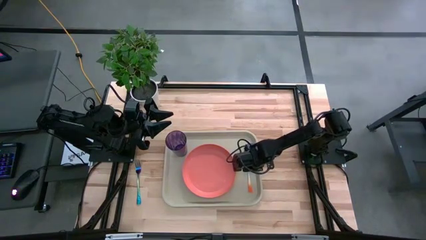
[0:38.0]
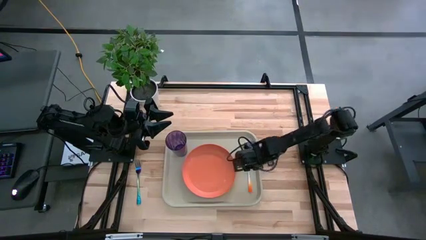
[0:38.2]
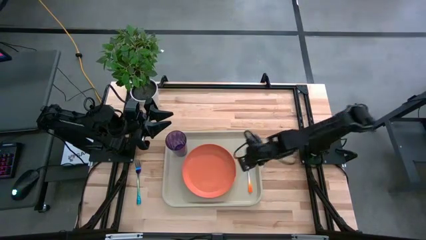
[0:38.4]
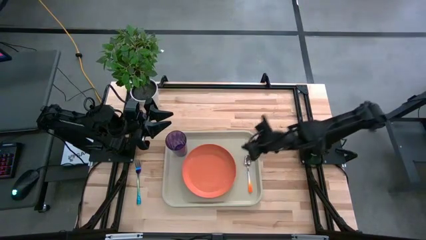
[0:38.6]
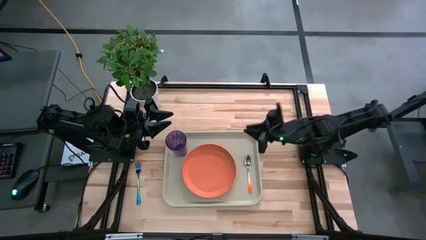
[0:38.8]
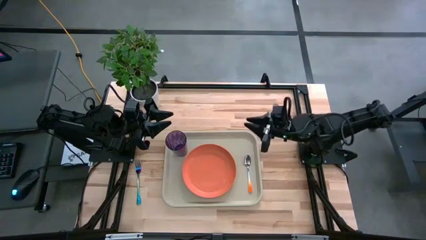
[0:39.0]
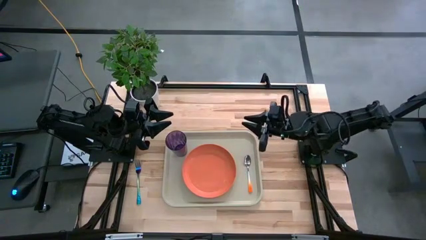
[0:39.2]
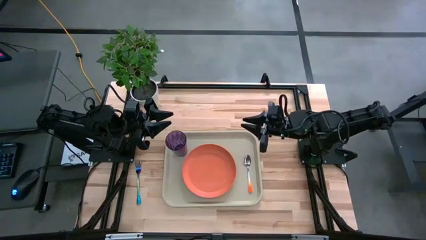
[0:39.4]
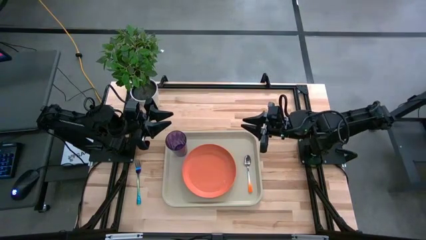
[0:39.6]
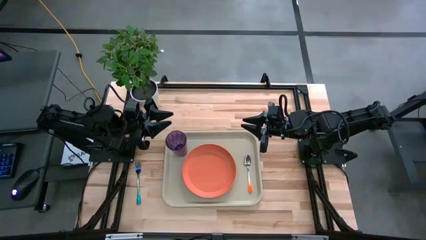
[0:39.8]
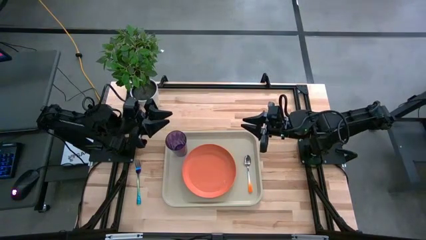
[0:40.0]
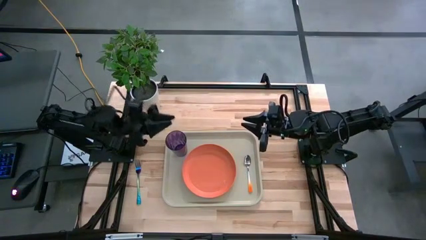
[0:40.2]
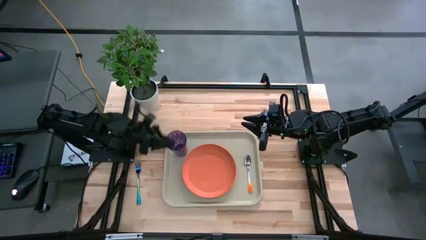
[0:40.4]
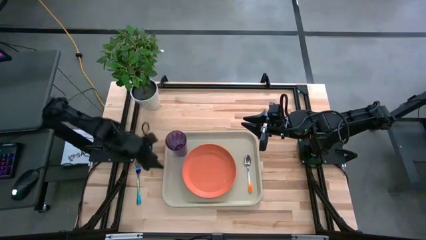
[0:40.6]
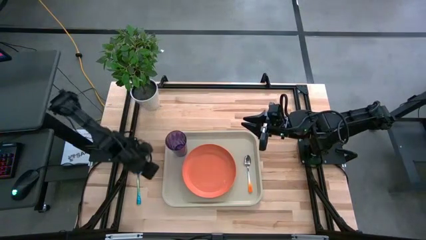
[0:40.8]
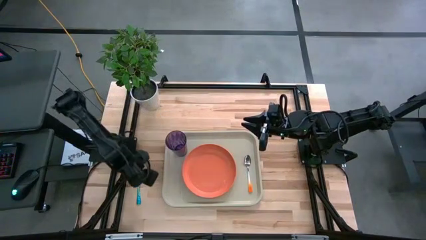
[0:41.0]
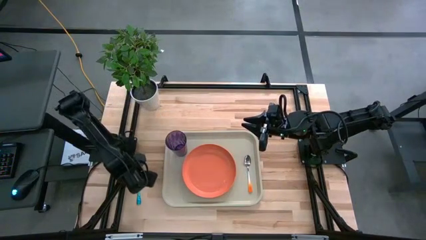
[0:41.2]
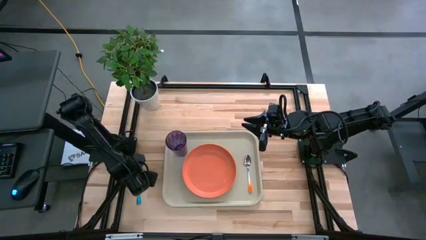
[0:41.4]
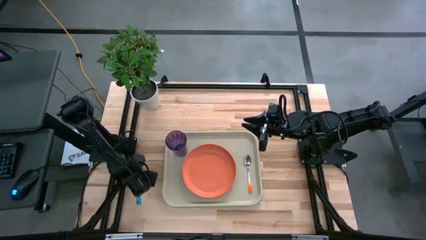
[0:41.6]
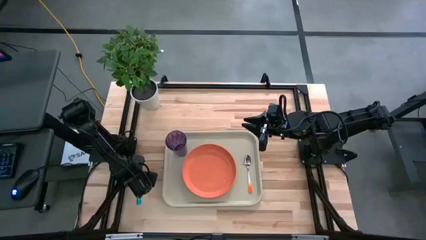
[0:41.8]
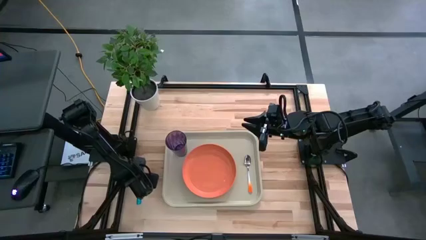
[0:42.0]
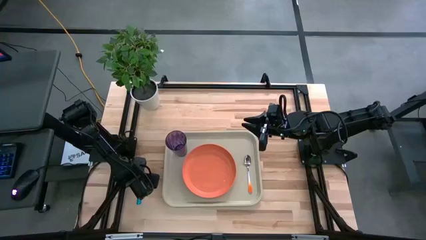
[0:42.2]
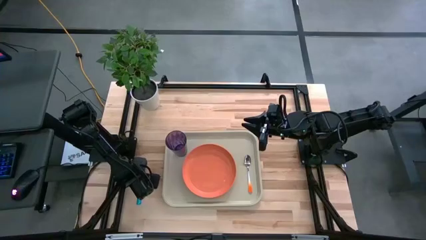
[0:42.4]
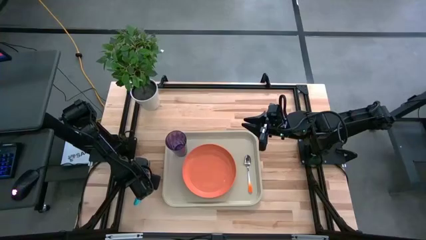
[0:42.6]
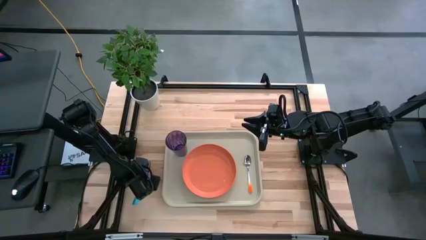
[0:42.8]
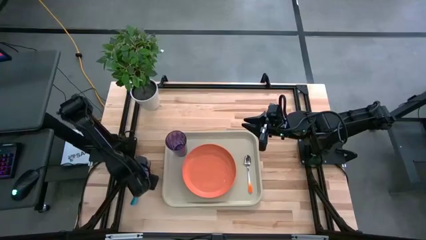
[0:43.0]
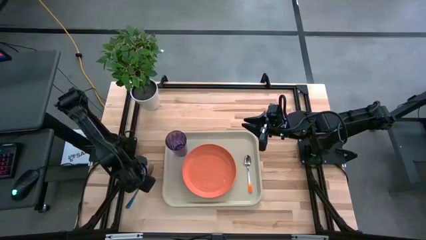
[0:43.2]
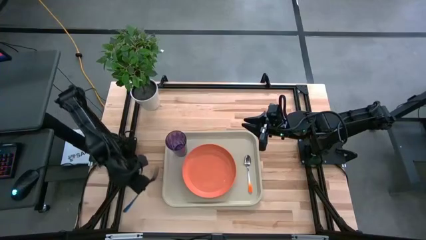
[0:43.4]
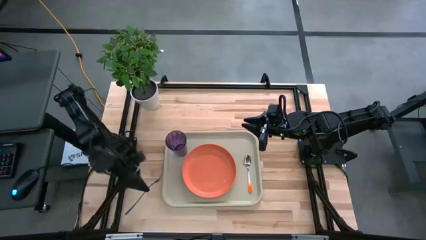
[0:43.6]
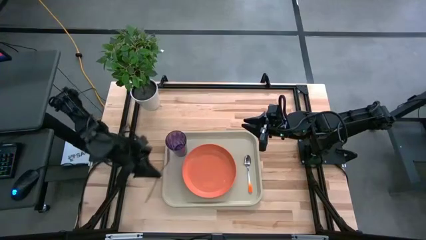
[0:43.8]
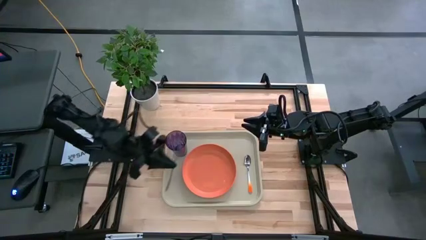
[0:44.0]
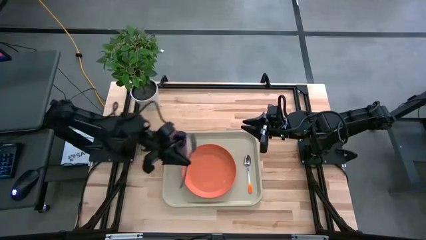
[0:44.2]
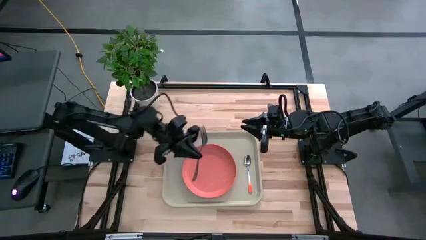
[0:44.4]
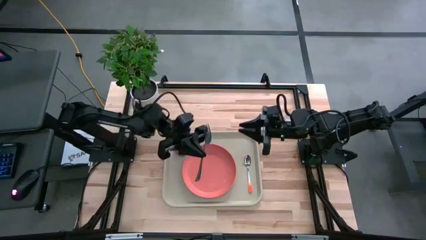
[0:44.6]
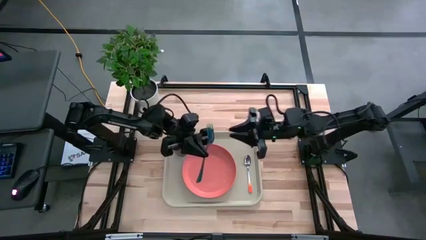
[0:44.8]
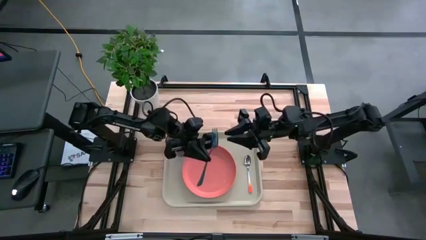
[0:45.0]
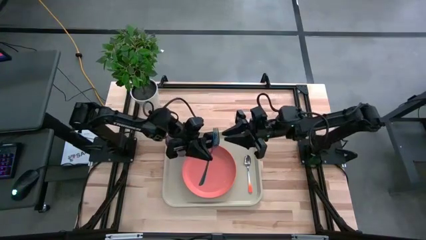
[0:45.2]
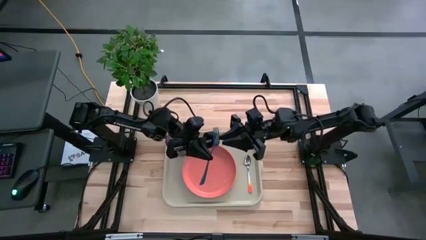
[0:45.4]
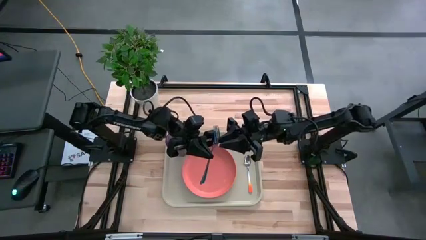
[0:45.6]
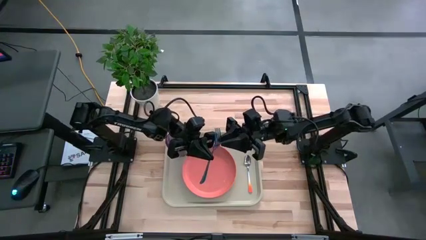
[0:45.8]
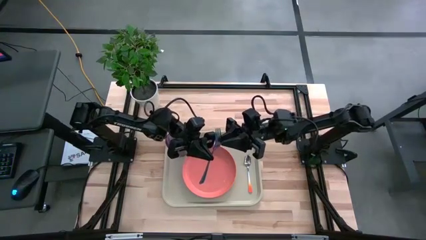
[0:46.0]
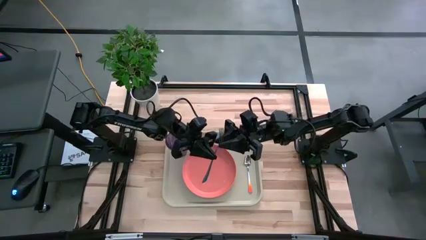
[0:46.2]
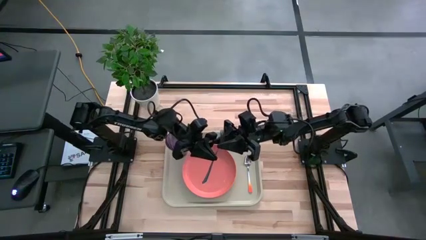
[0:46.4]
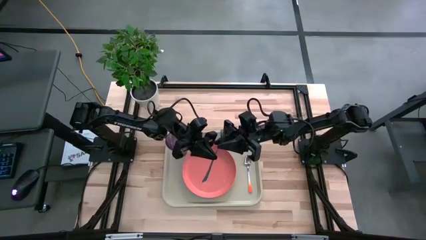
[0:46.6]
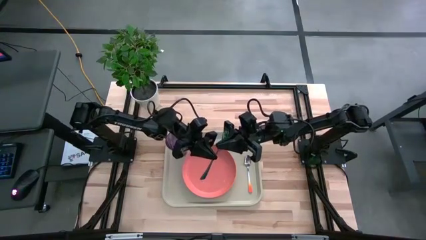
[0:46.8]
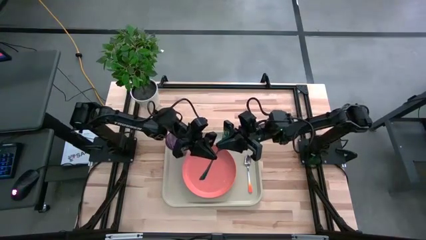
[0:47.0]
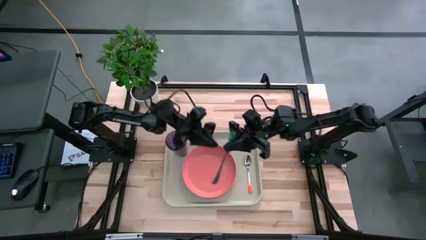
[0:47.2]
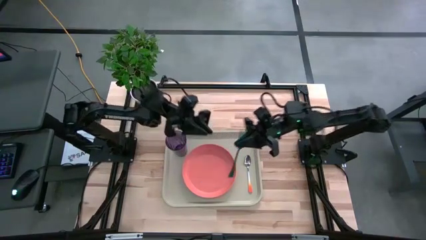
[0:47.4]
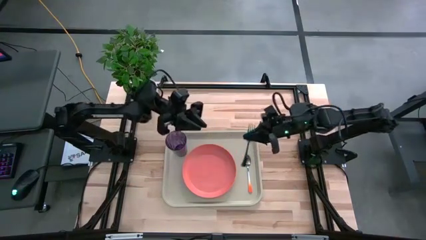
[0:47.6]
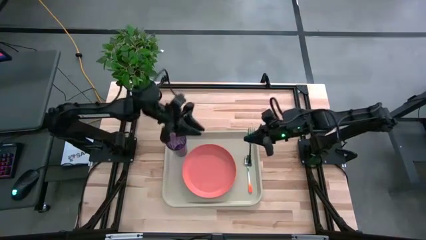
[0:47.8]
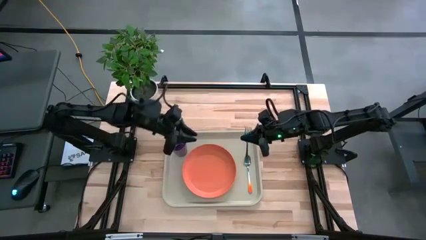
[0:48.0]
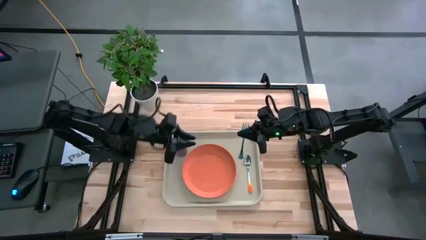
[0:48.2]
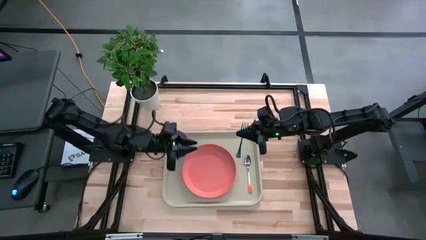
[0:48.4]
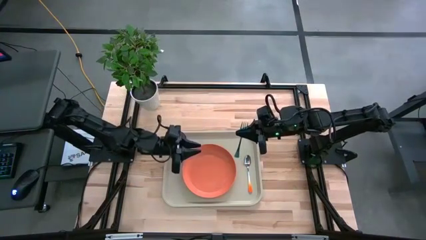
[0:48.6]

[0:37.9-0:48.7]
Task: Pick and place plate/cup/fork/spoon on tray
Put the purple fork to the left side of the orange spoon on the gray serving tray

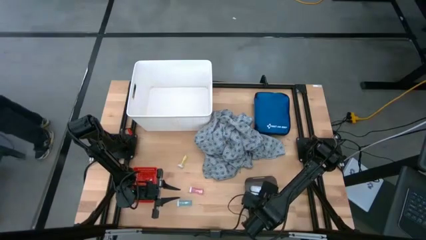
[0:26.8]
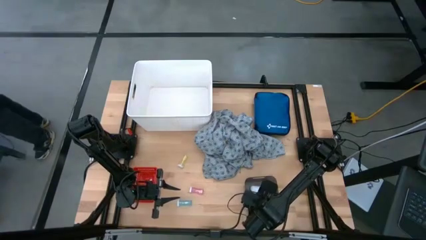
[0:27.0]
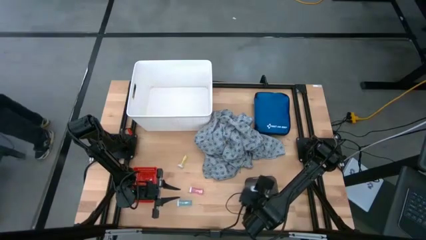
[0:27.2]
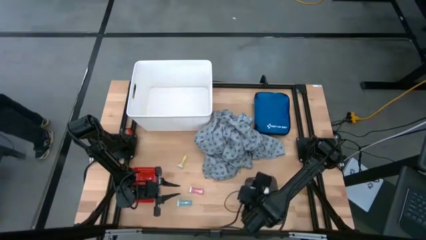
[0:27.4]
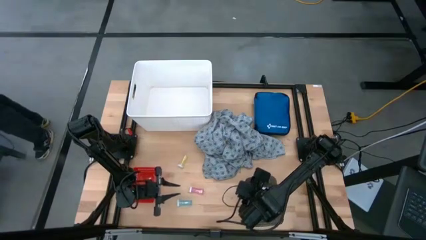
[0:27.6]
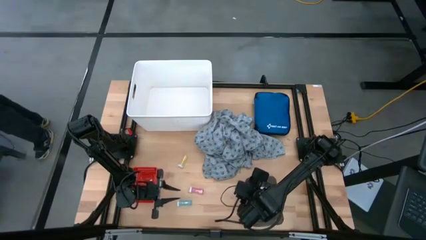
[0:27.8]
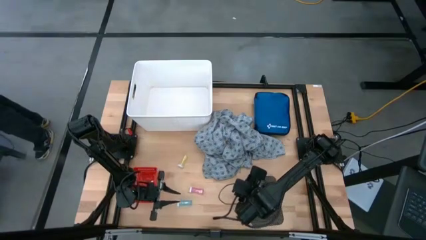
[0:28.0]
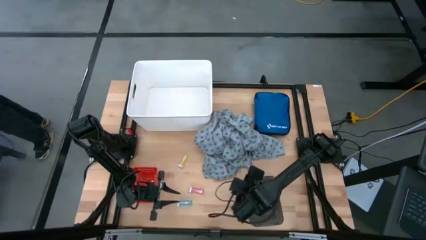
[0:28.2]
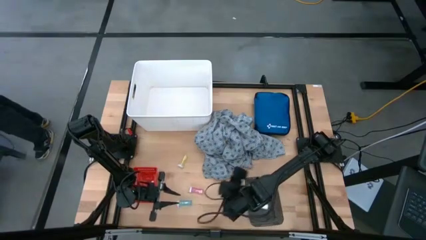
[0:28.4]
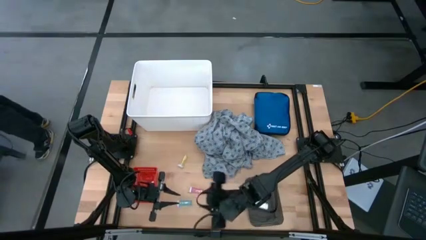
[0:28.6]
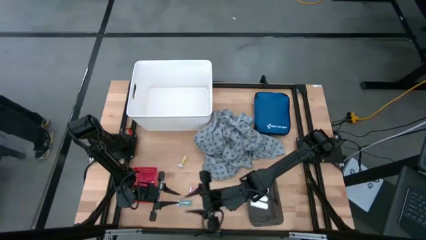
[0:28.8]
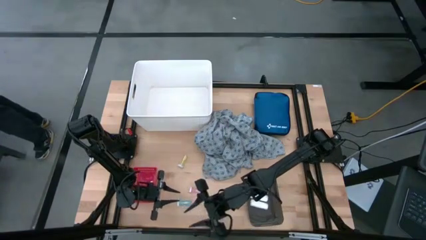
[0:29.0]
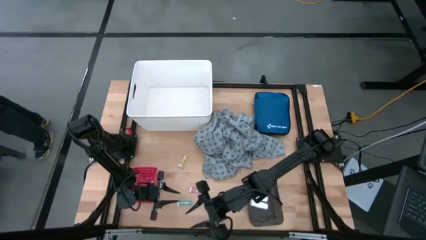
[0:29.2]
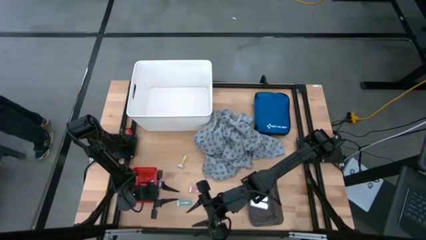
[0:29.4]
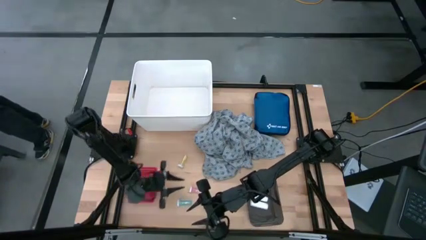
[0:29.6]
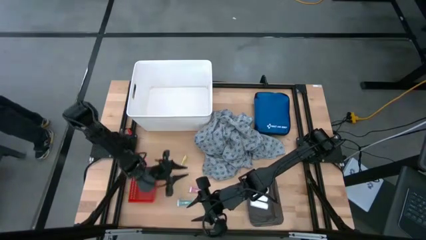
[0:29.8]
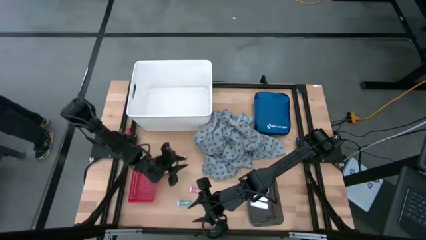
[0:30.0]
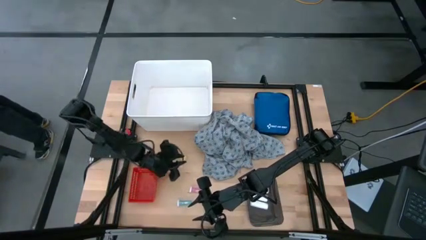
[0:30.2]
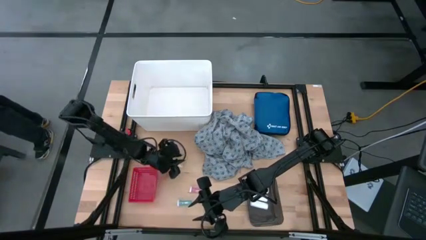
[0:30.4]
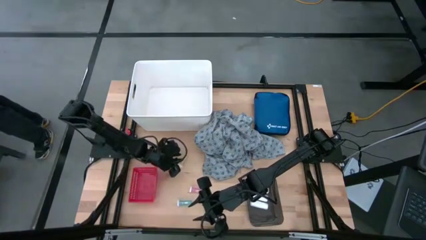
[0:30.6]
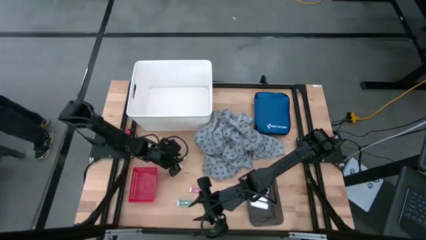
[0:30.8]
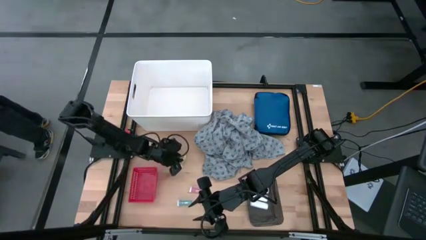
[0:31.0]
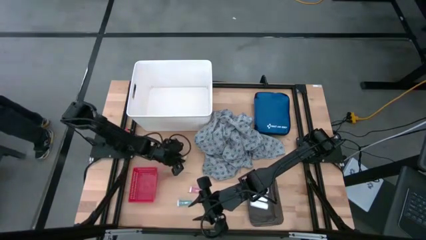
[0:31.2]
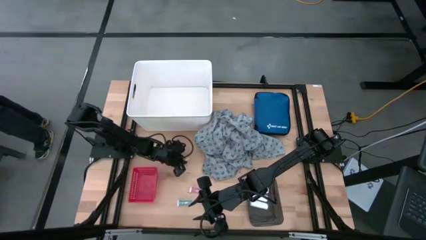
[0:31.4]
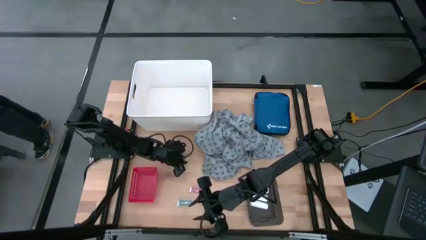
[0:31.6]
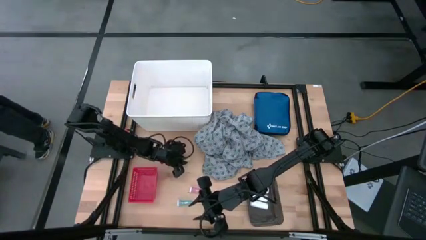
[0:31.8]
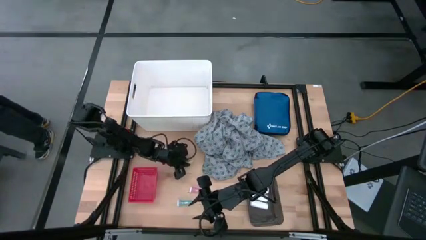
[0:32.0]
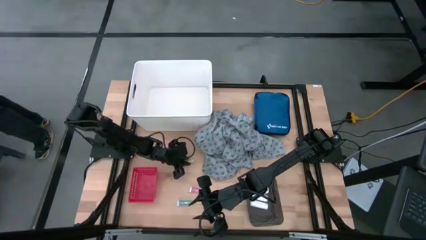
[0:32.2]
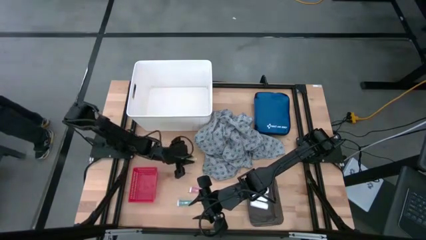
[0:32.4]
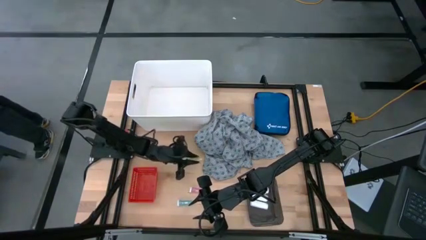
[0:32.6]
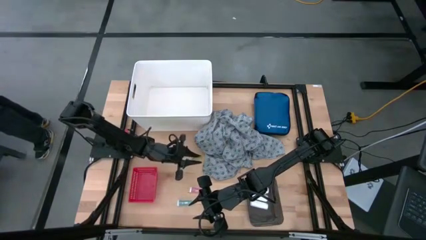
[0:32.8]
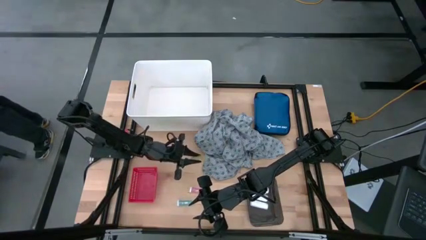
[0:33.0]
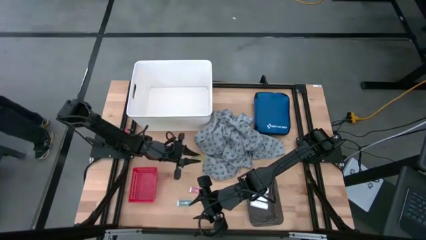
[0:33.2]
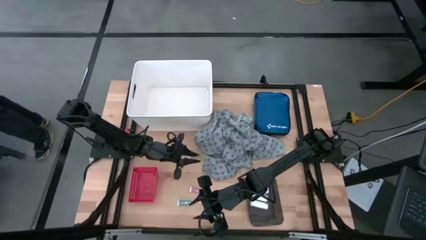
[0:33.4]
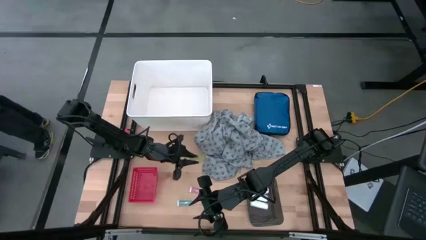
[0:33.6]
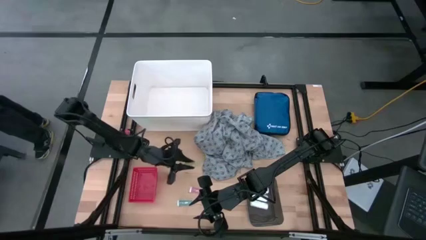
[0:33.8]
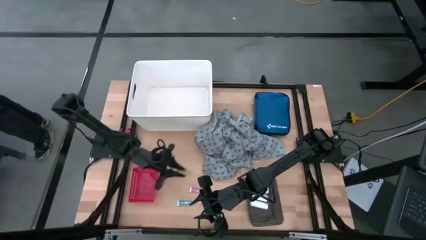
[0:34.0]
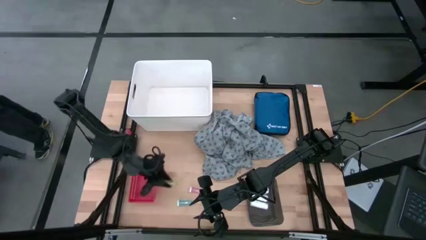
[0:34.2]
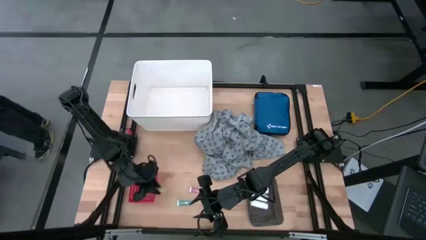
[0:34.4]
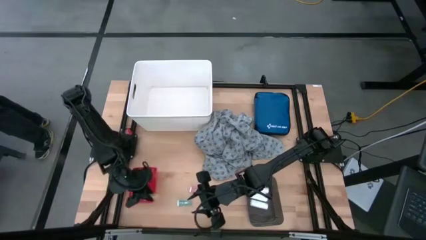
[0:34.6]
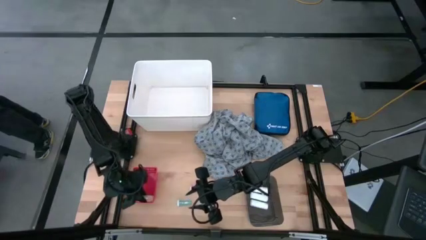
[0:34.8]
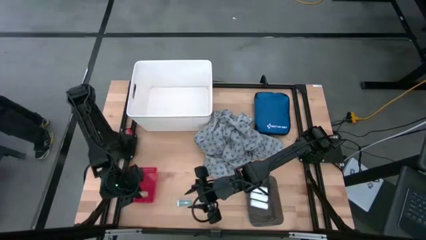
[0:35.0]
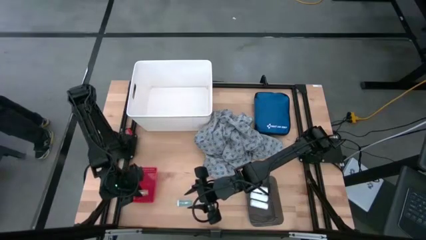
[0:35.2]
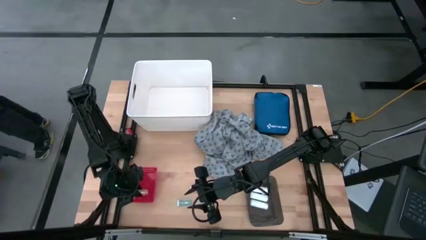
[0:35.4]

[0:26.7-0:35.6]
Task: Pick & Place Medicine items
Put the yellow pill bottle into the red bin
